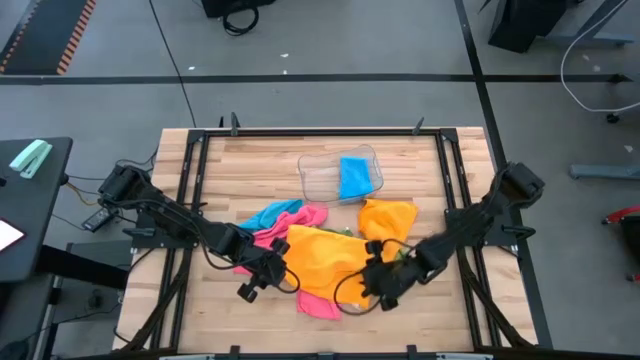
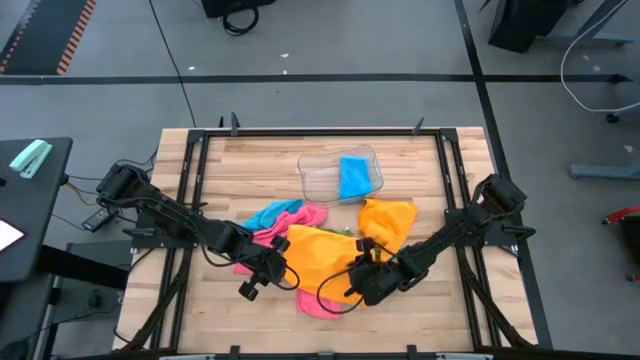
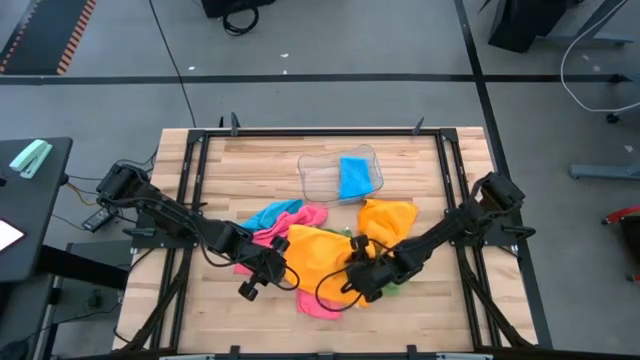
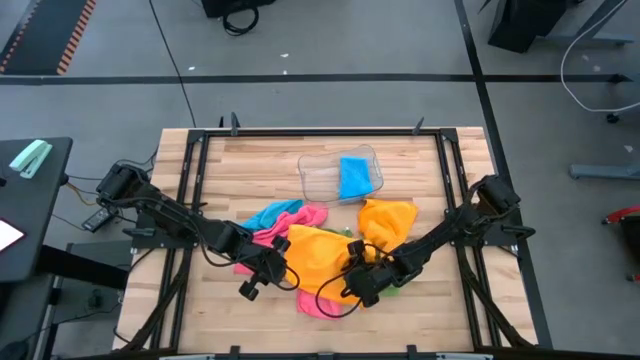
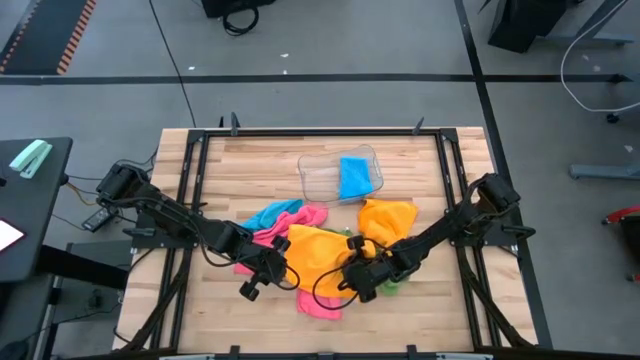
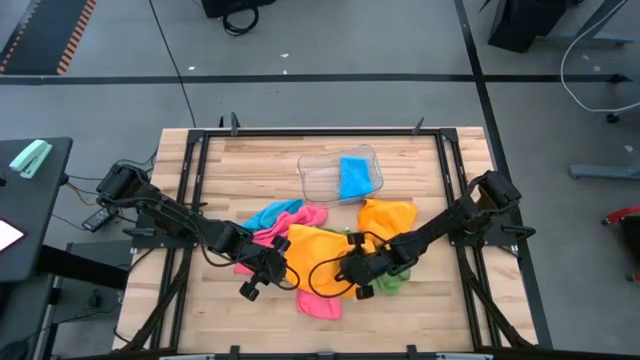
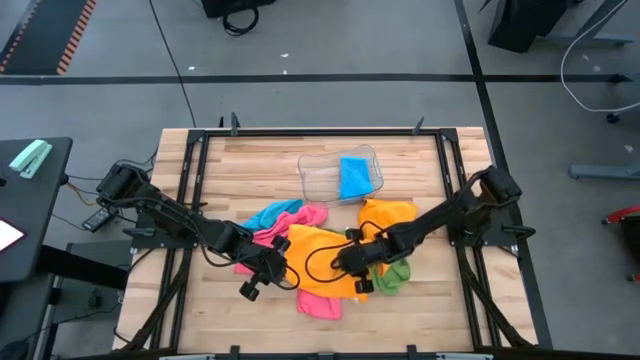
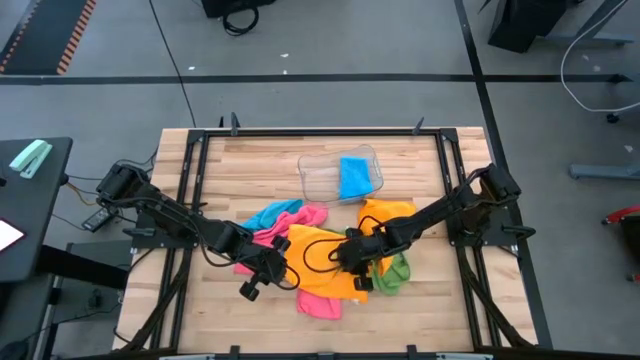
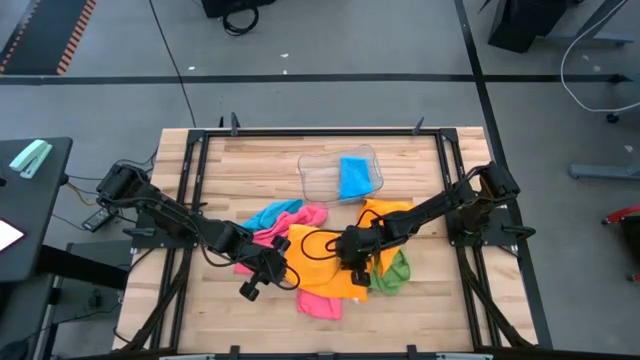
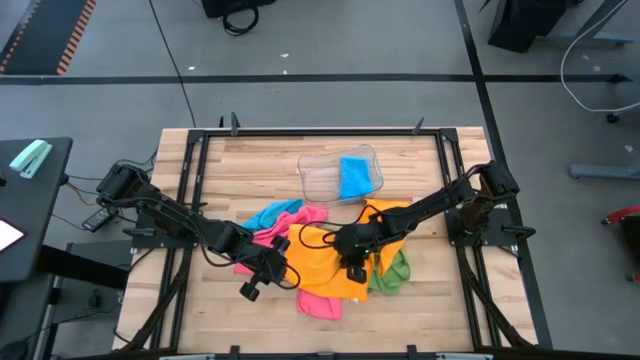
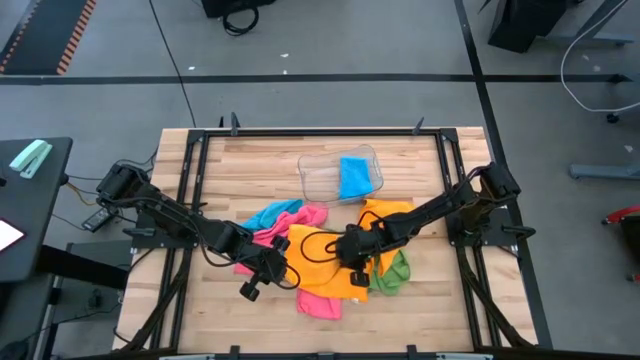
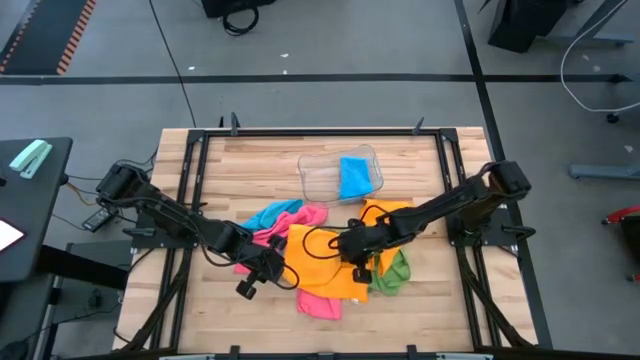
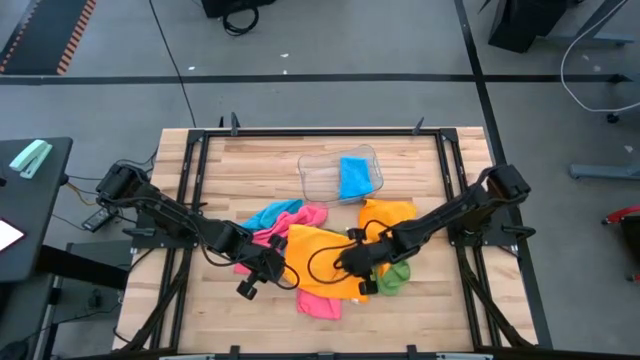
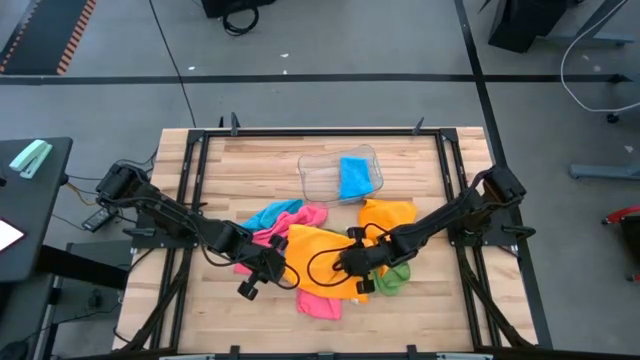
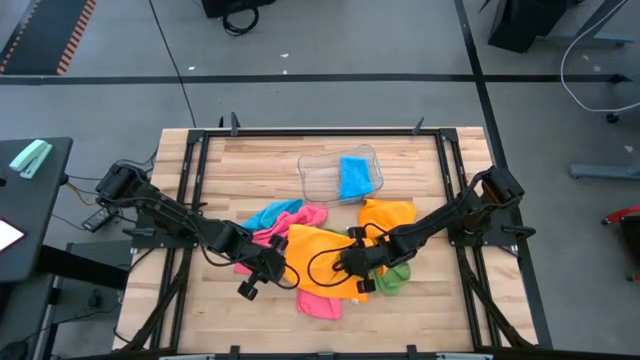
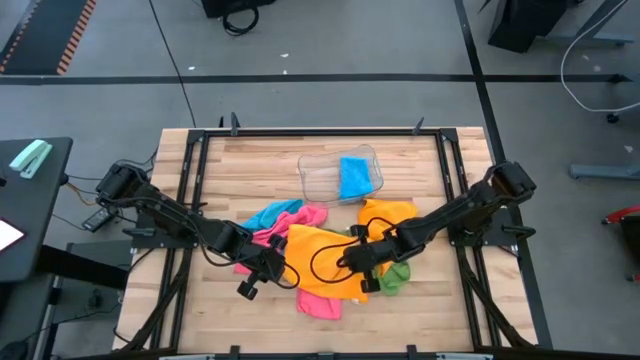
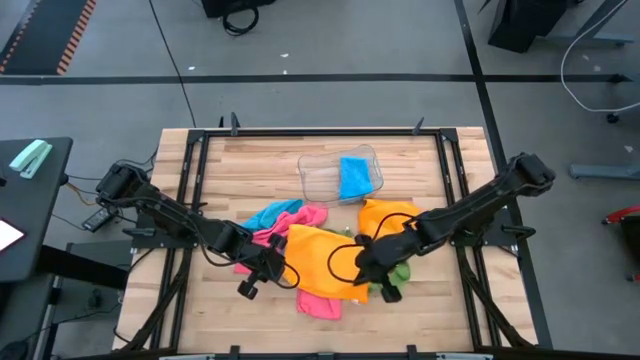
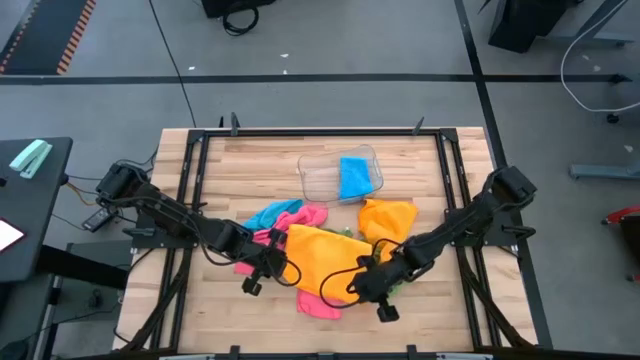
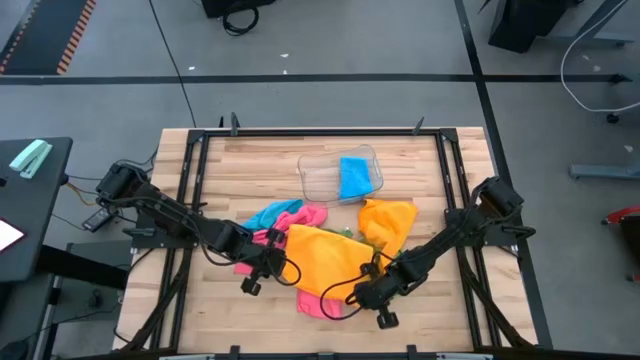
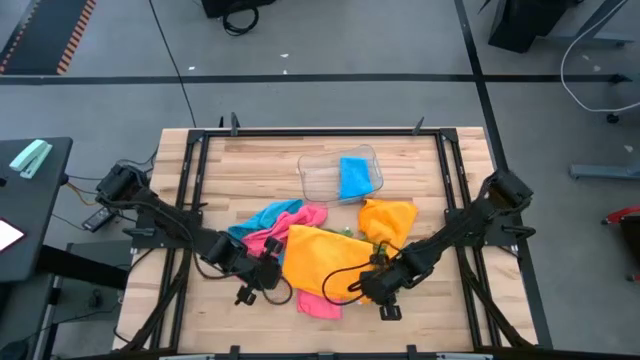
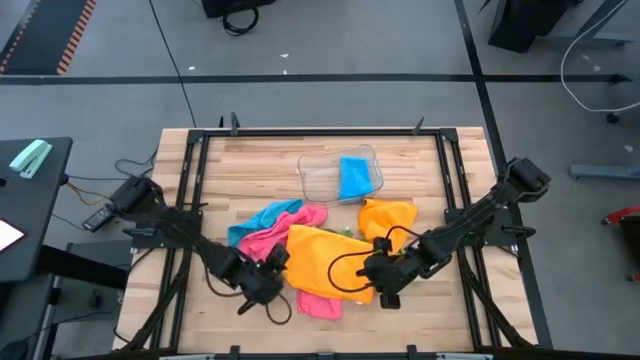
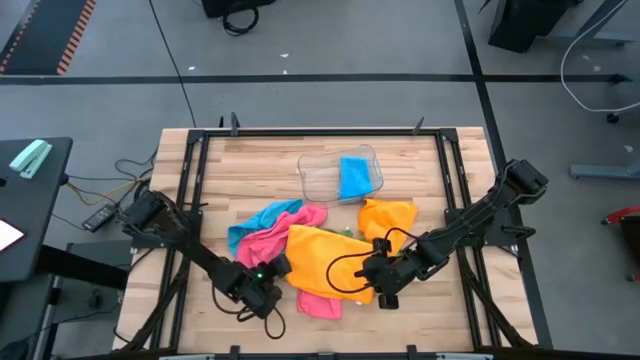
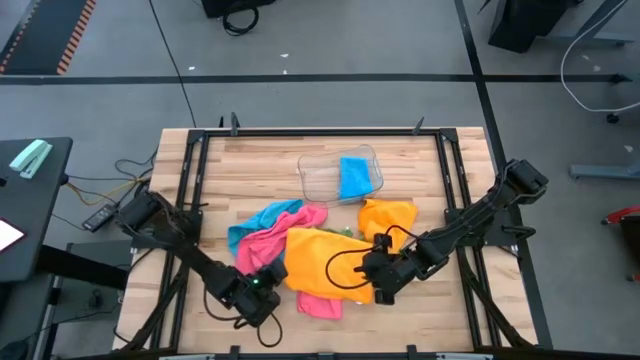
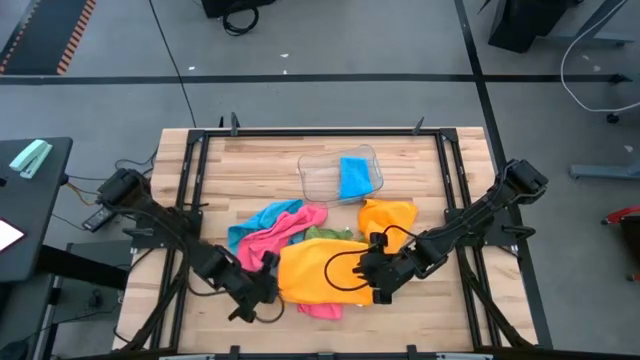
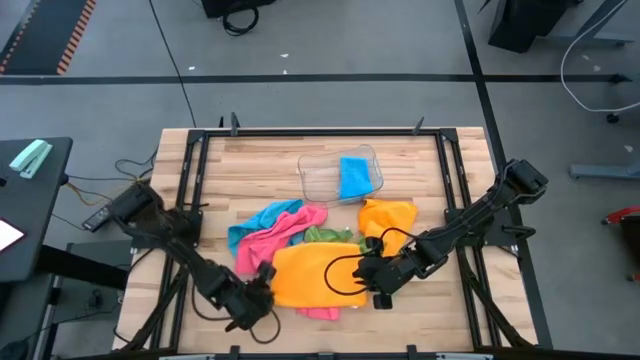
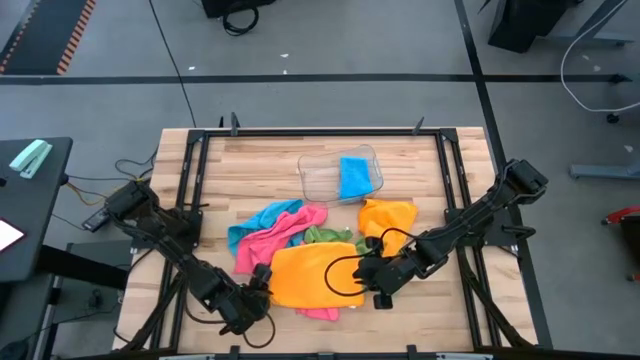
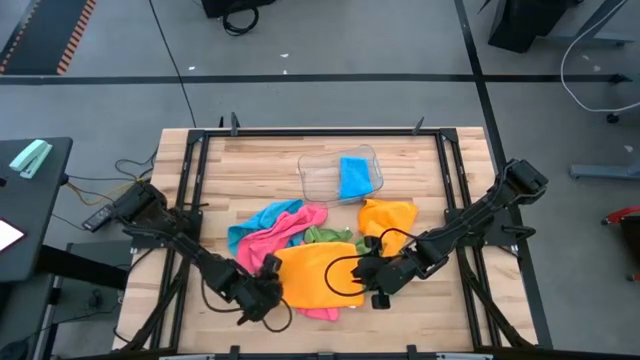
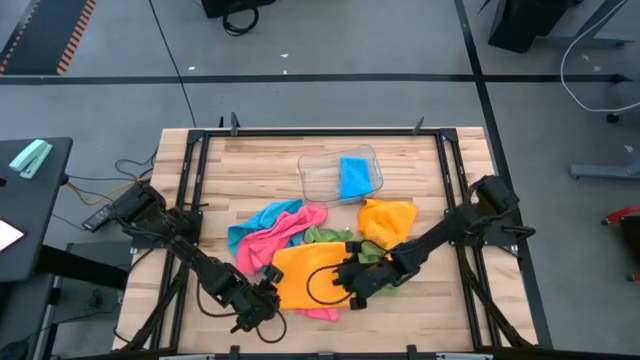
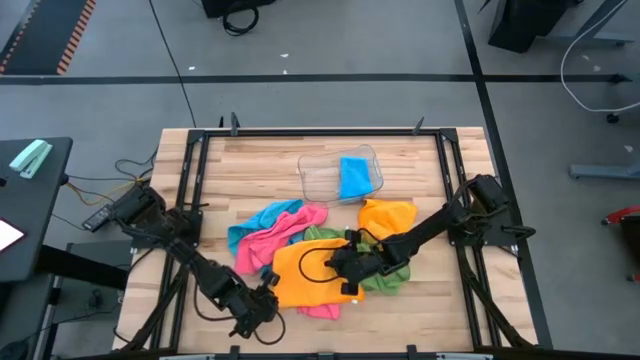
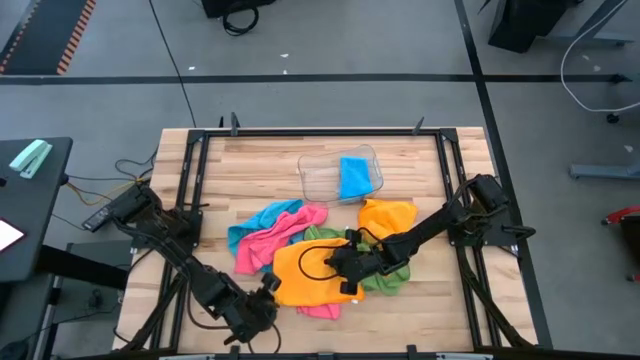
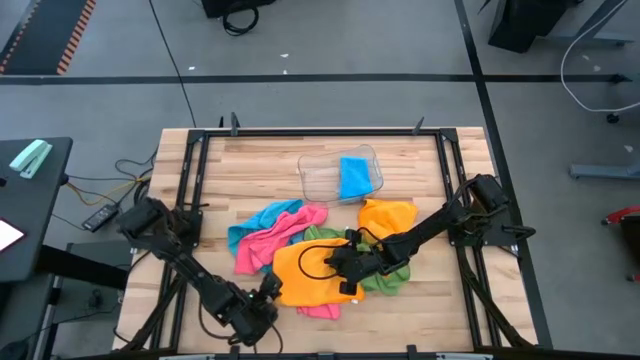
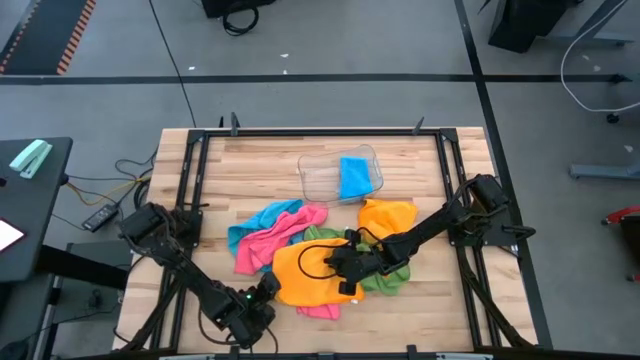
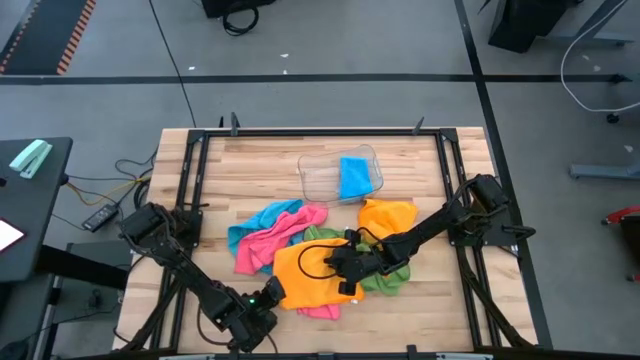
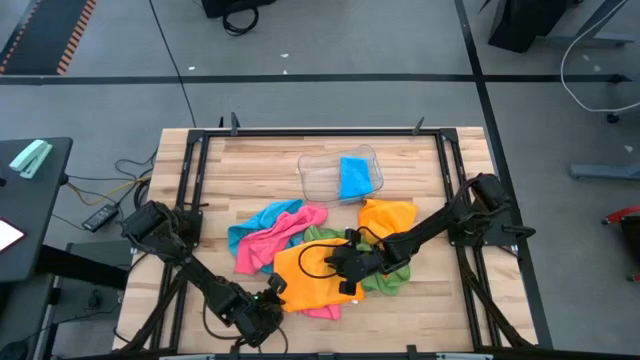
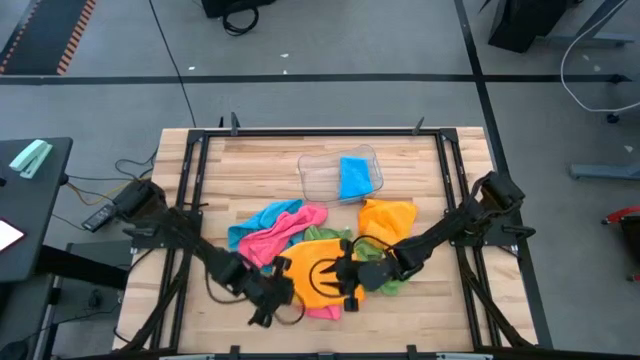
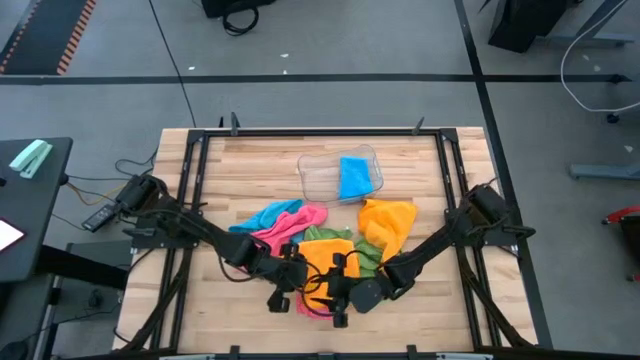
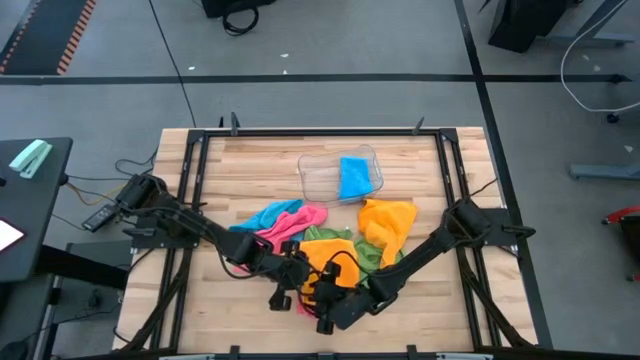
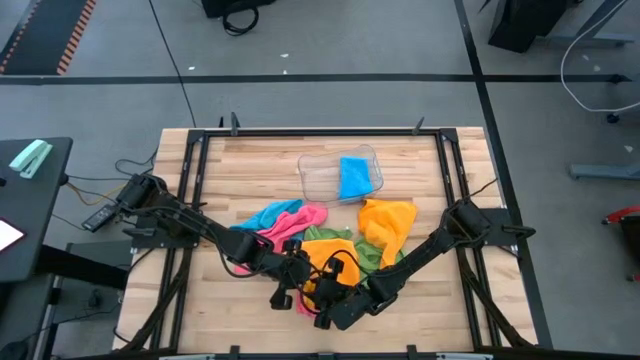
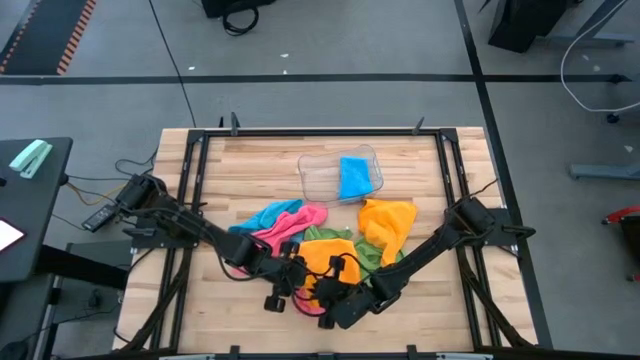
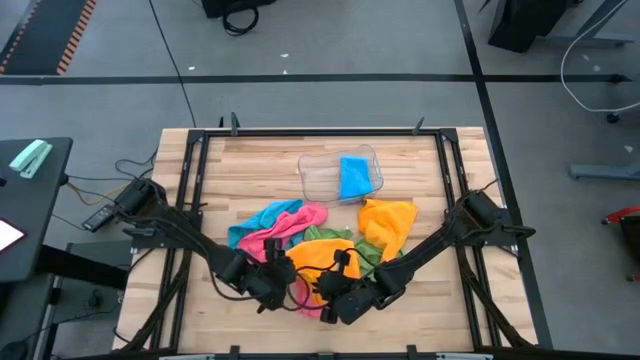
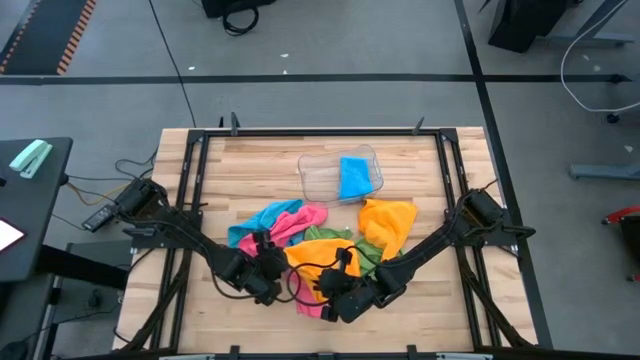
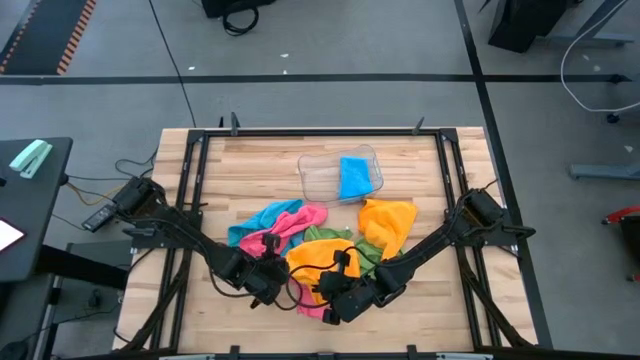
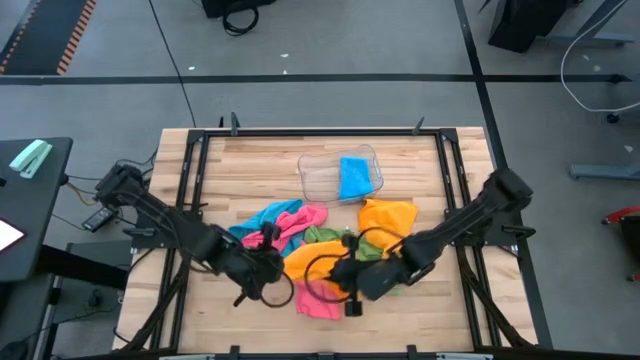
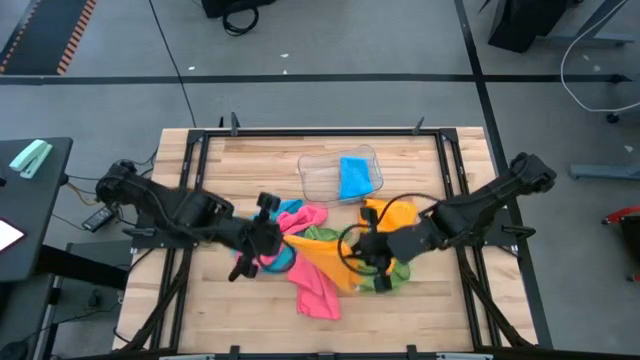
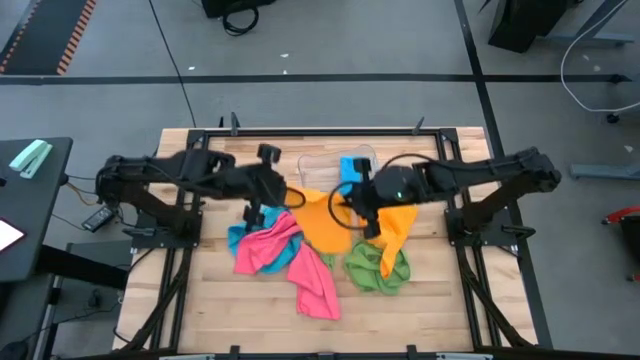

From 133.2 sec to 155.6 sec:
Task: Fold microfiber towels
Fold the left yellow microfiber cloth
